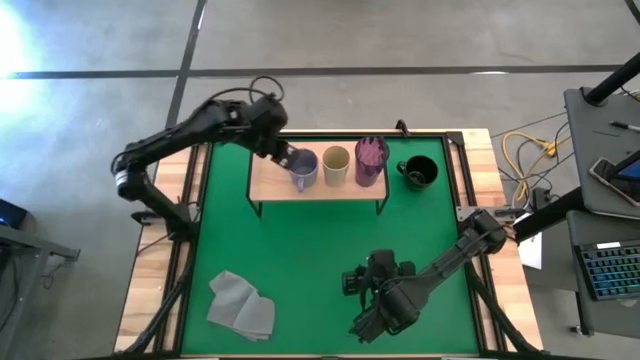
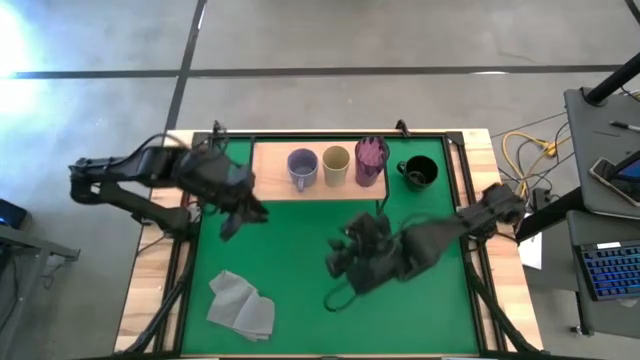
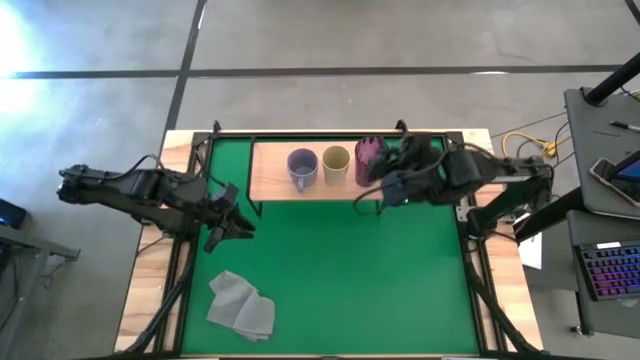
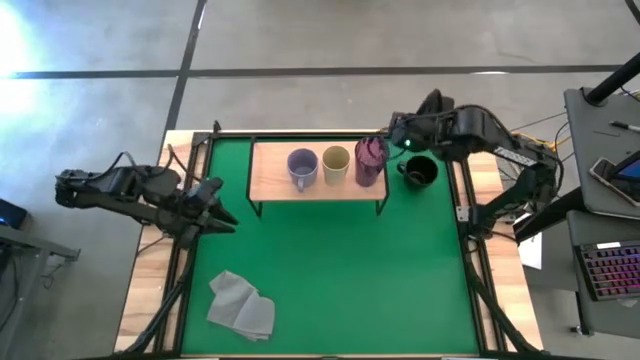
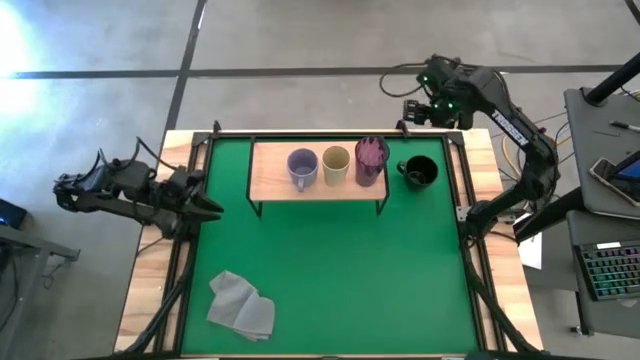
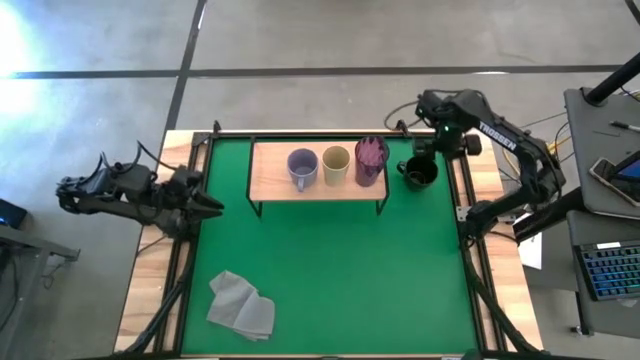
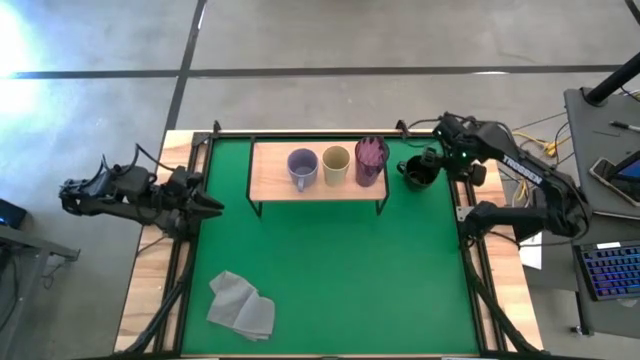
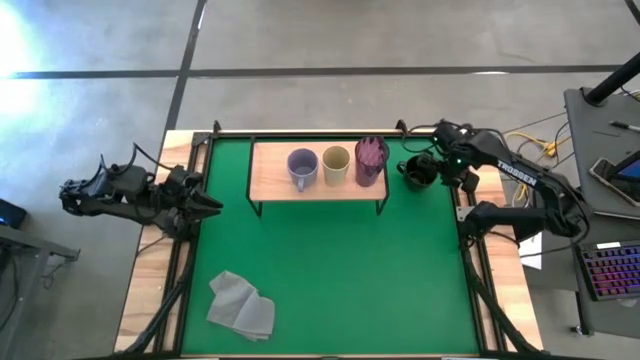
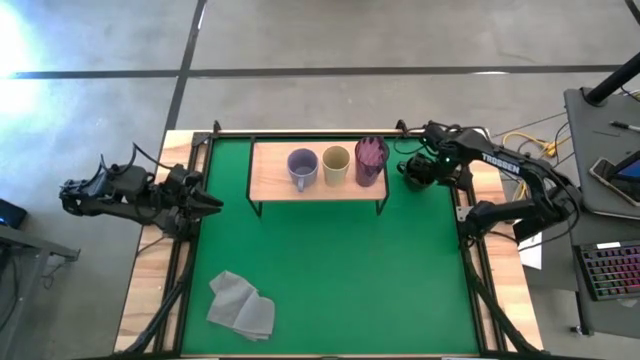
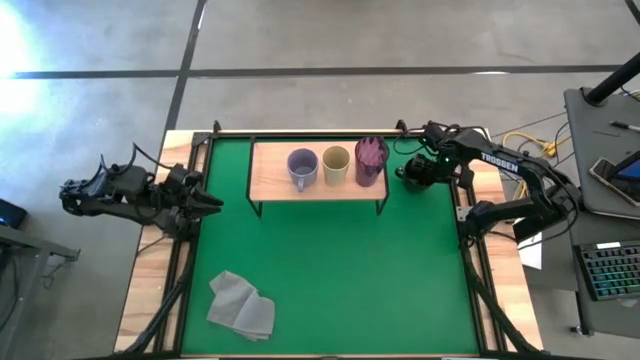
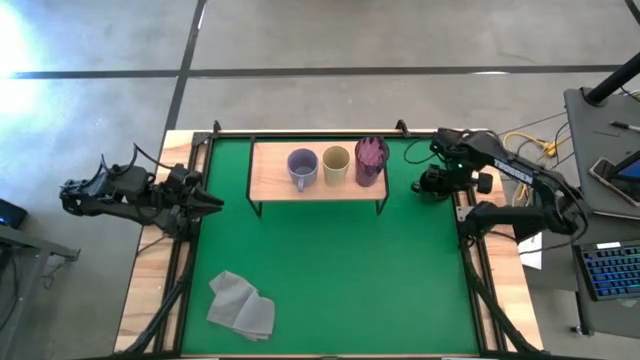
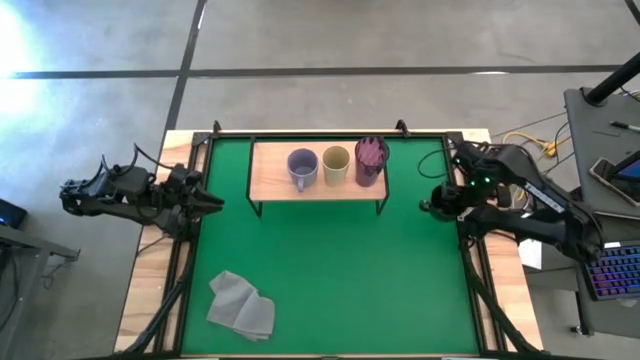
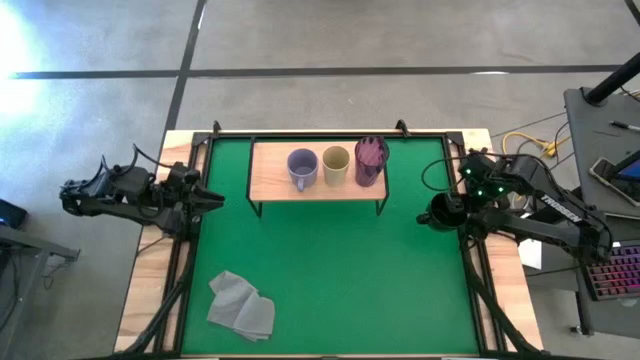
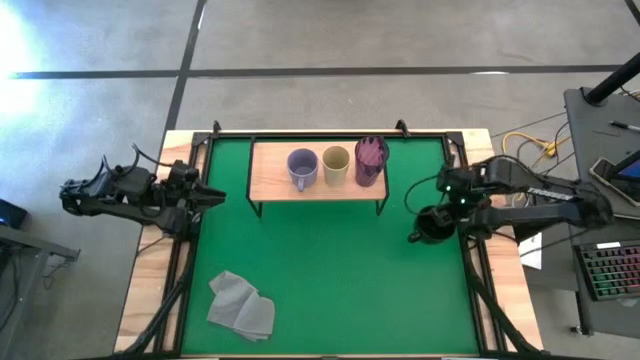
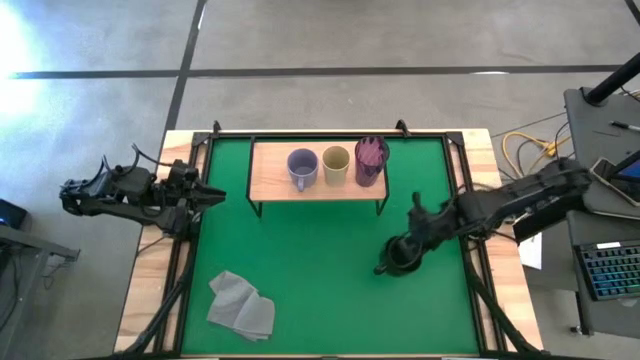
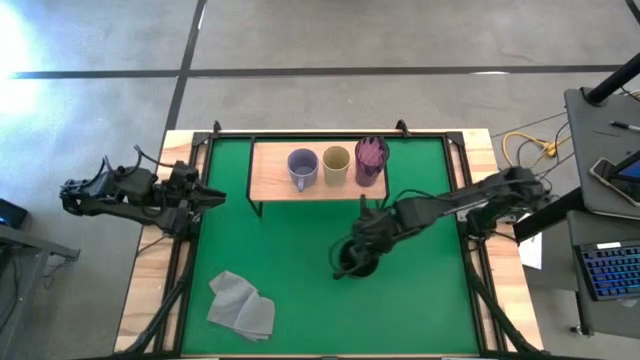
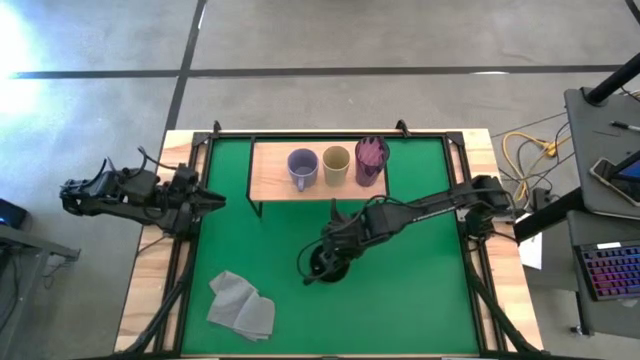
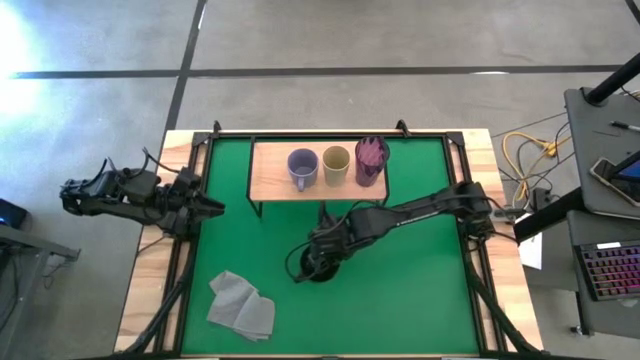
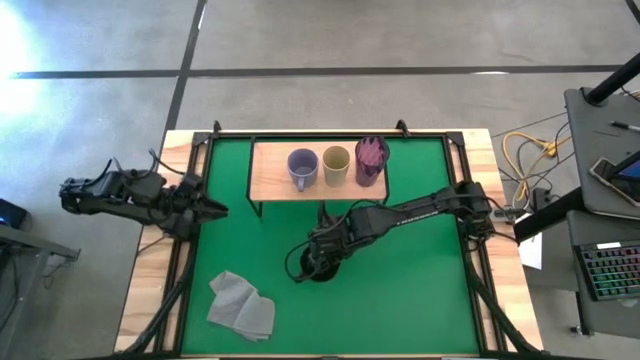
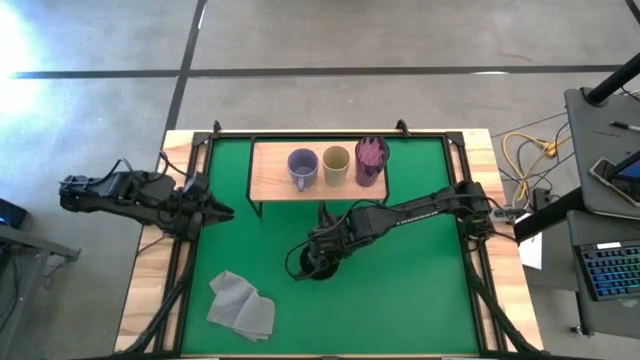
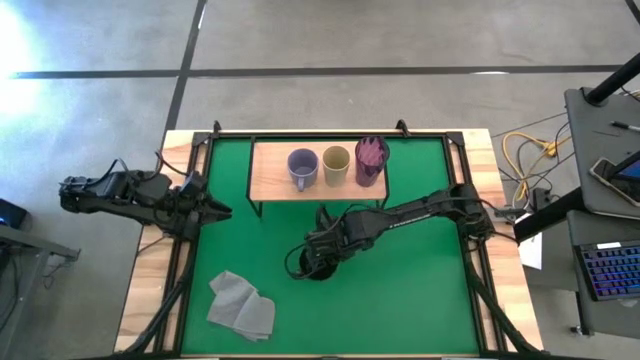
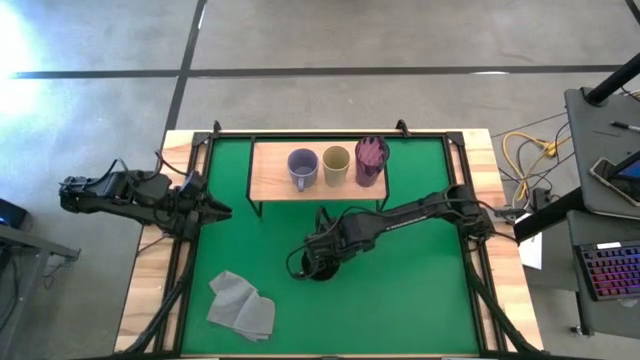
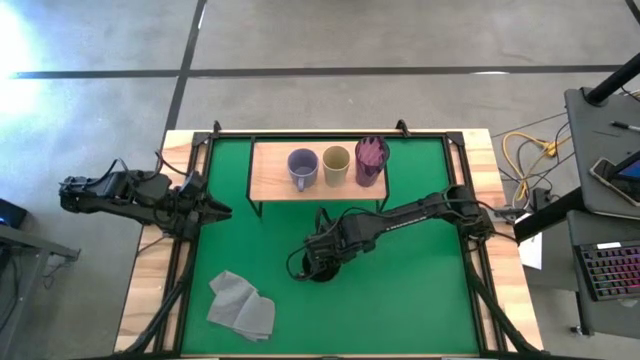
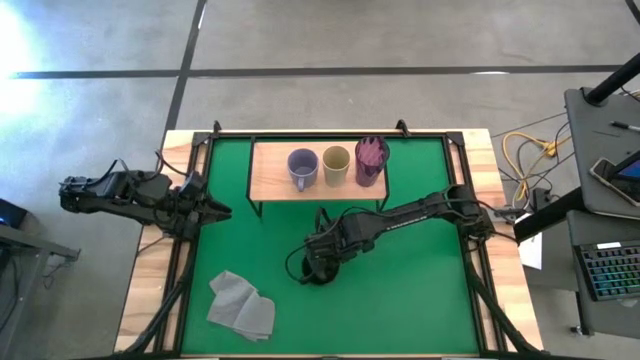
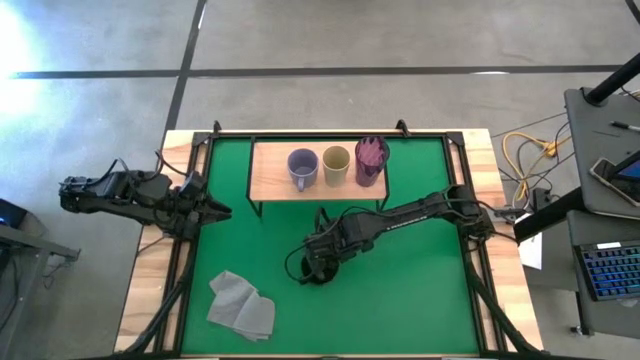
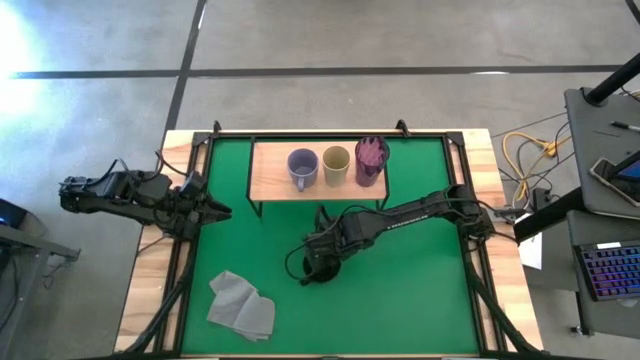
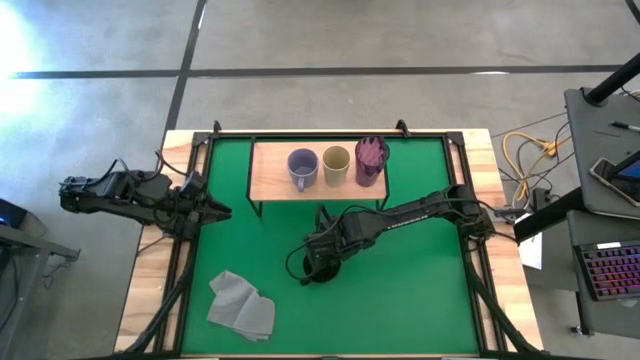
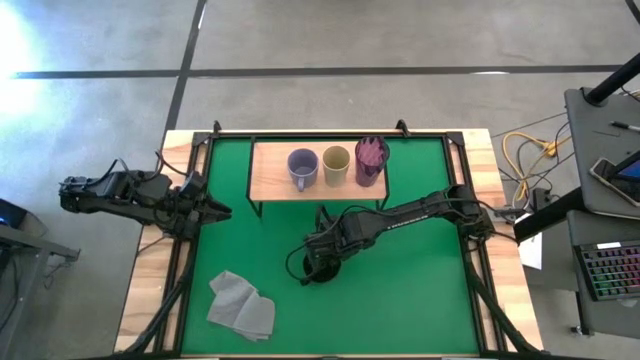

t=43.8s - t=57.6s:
Task: Stack small to large cups/mugs on shelf
Put the black mug on the shelf

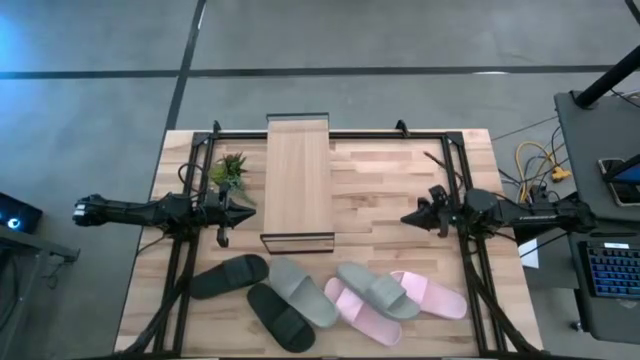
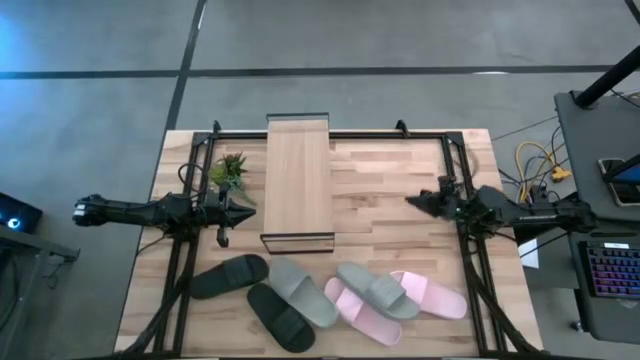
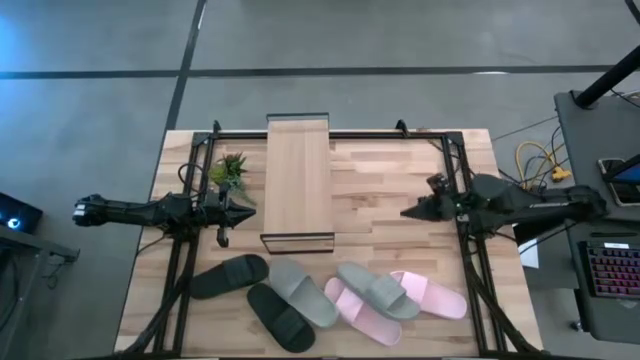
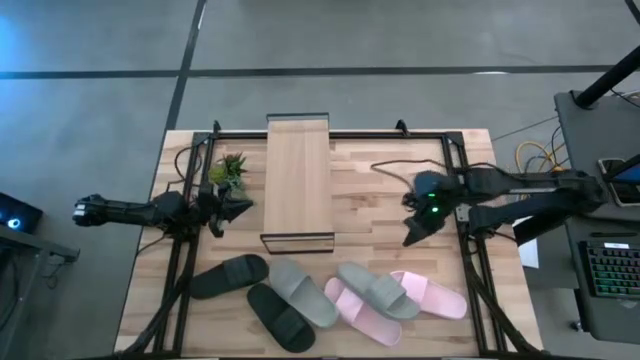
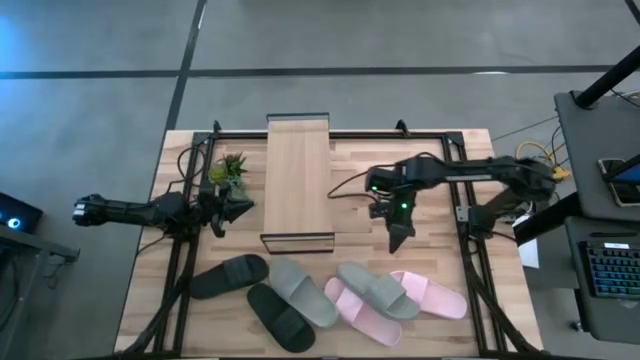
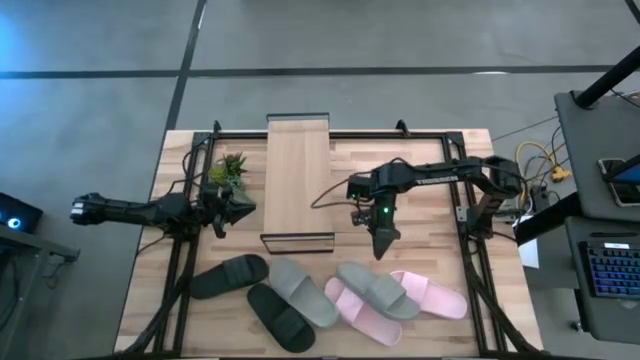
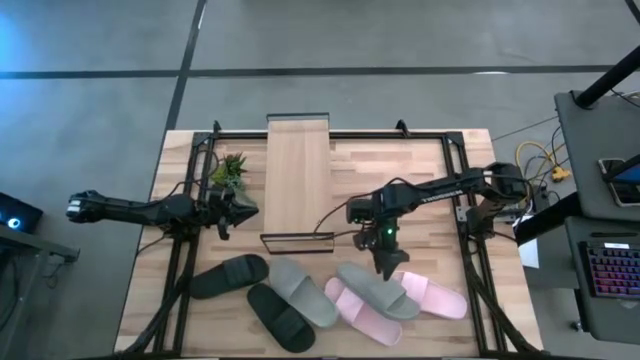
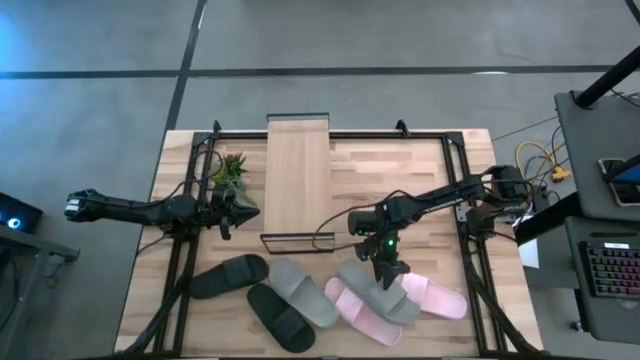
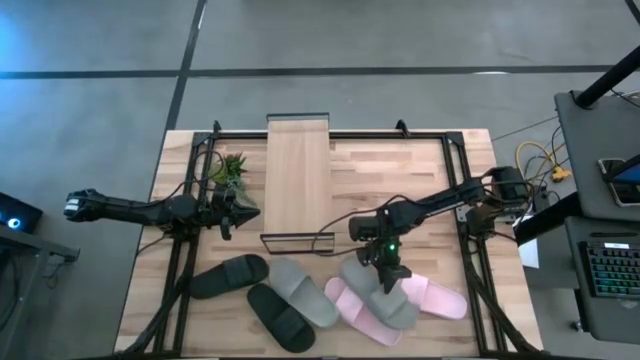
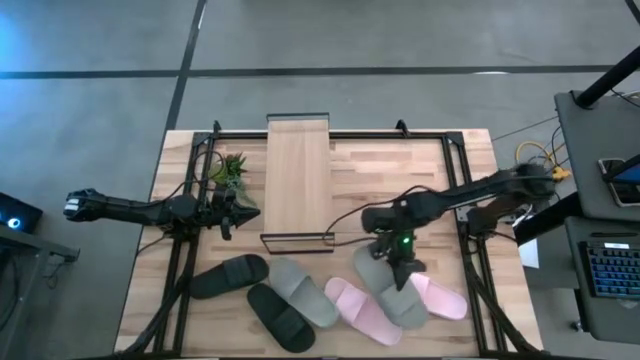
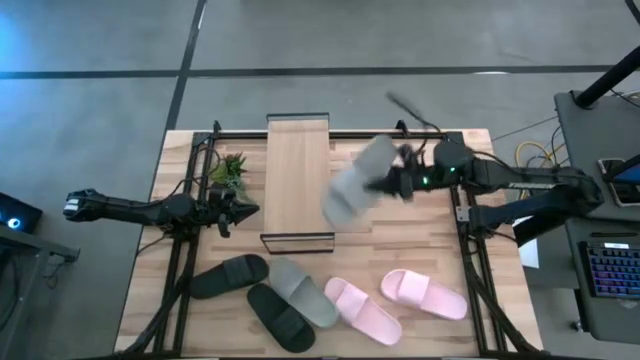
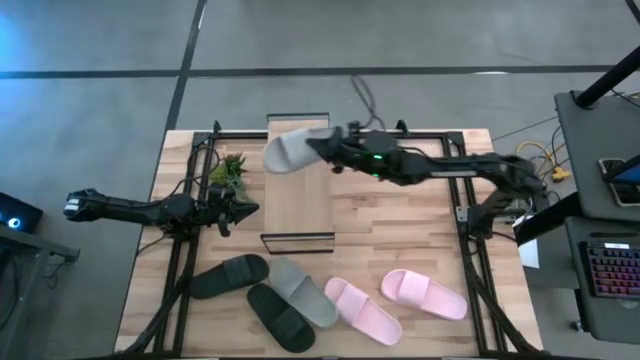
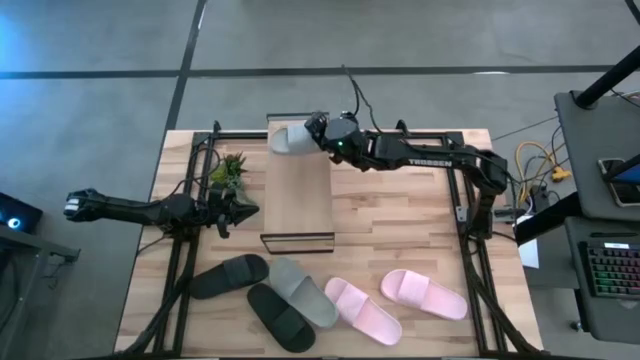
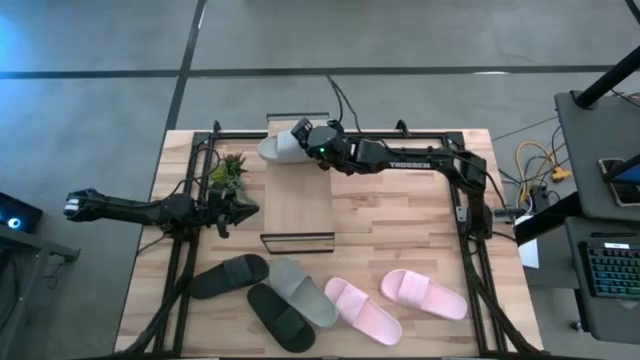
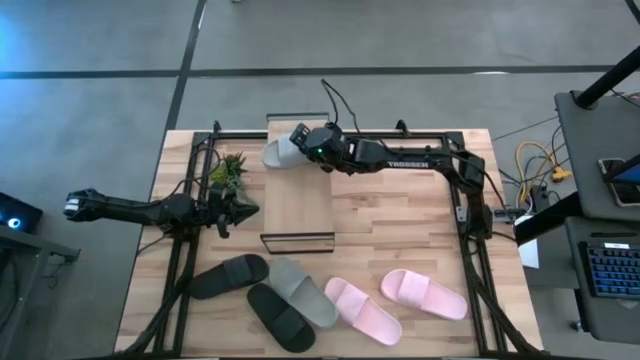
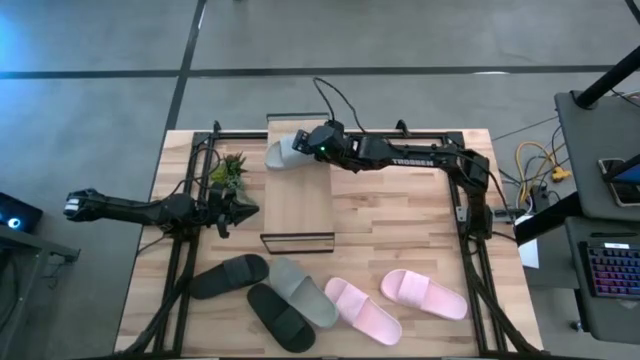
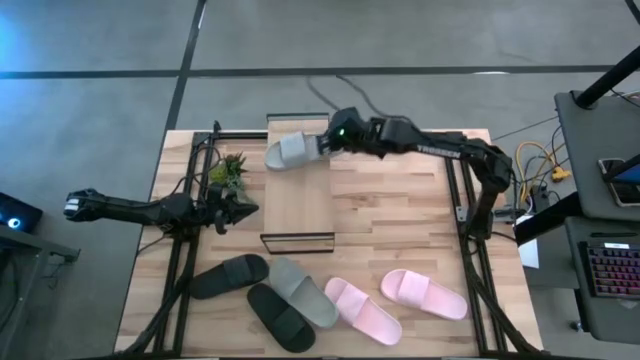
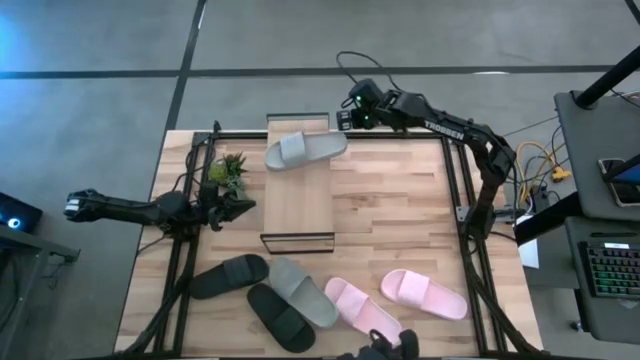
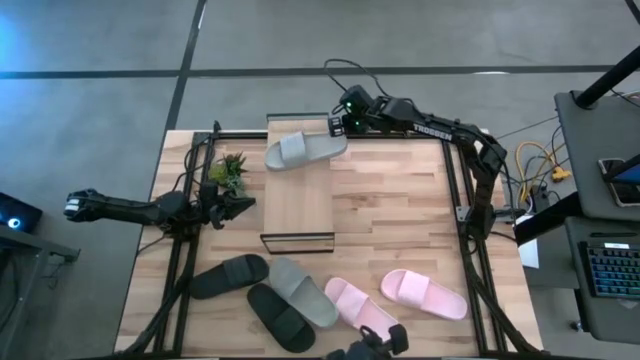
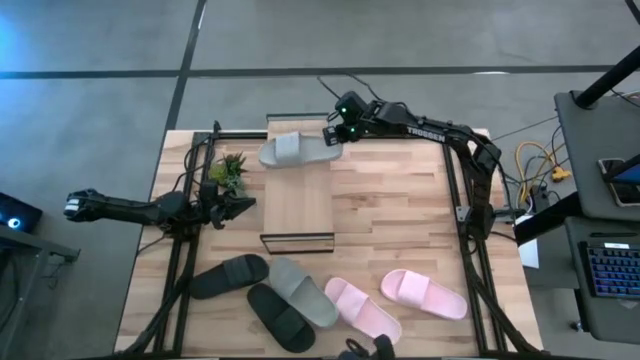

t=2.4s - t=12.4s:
Task: Pick and place slides into the shelf
Put the left gray slide on the shelf
